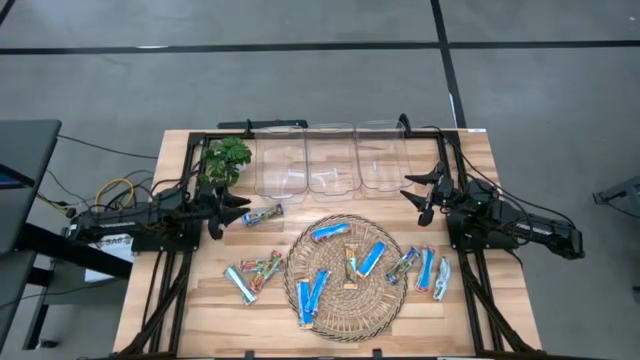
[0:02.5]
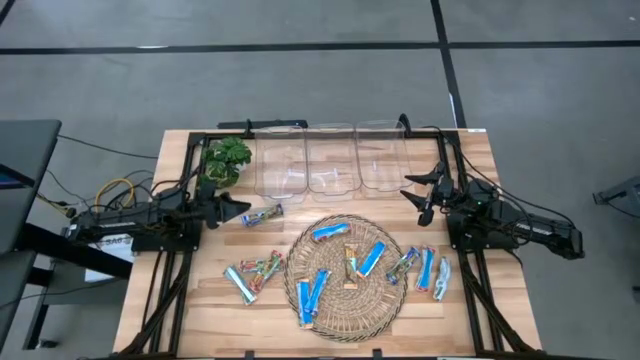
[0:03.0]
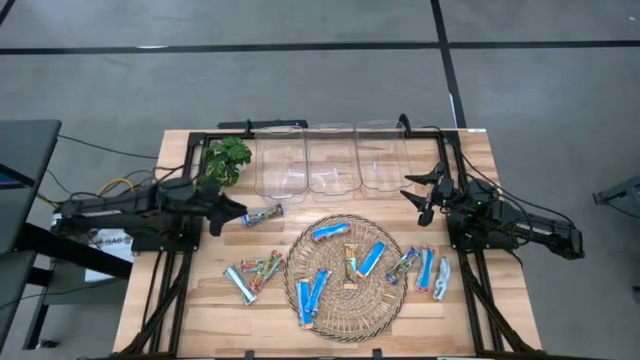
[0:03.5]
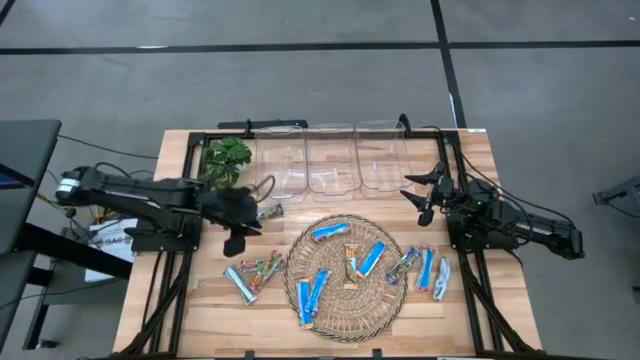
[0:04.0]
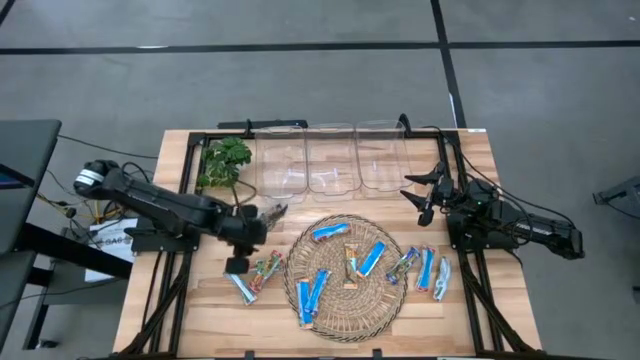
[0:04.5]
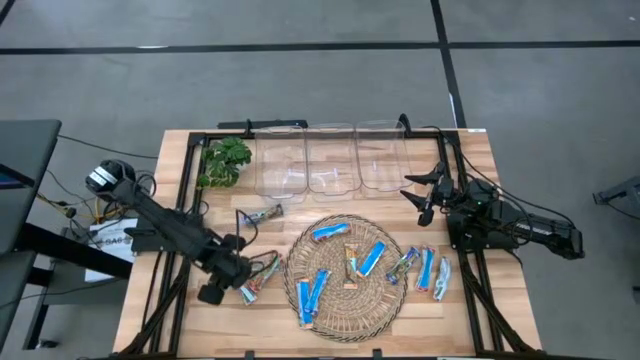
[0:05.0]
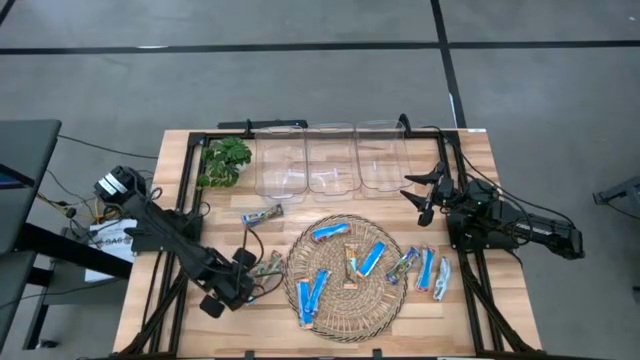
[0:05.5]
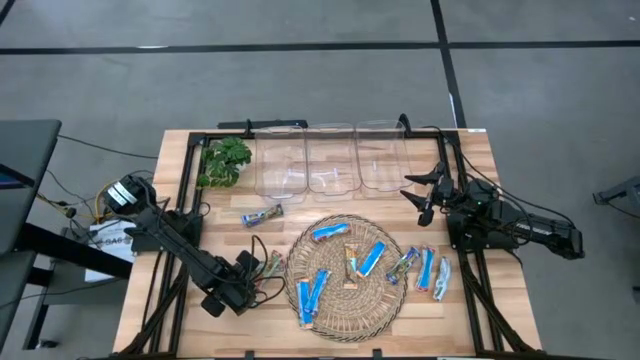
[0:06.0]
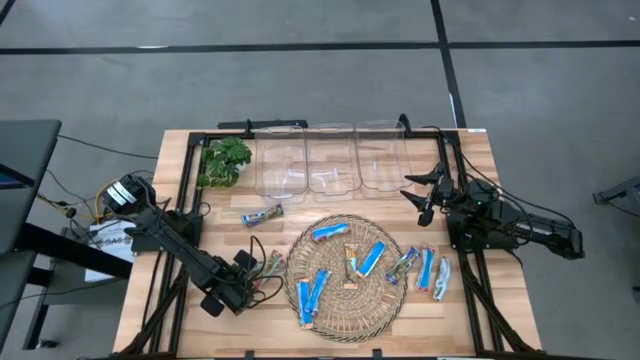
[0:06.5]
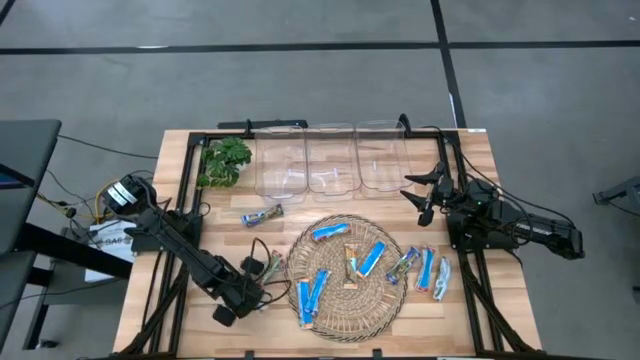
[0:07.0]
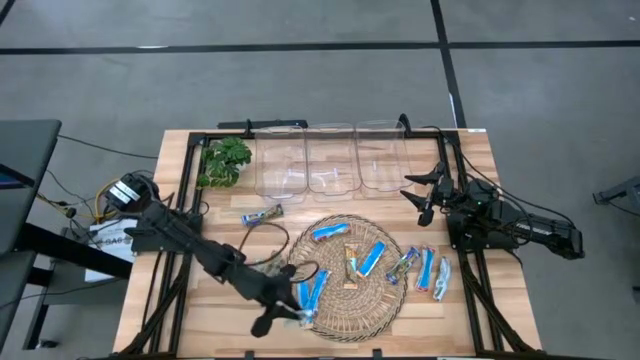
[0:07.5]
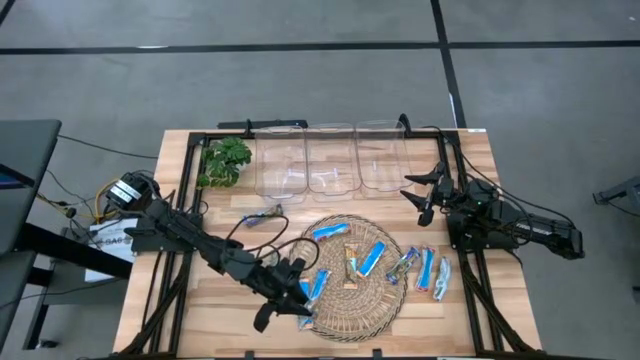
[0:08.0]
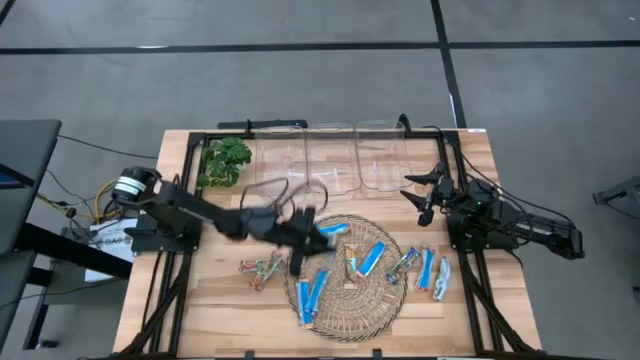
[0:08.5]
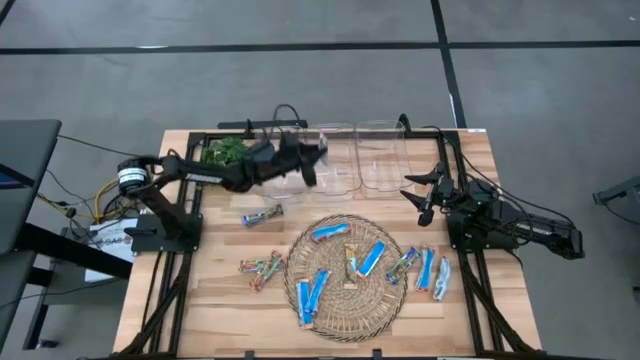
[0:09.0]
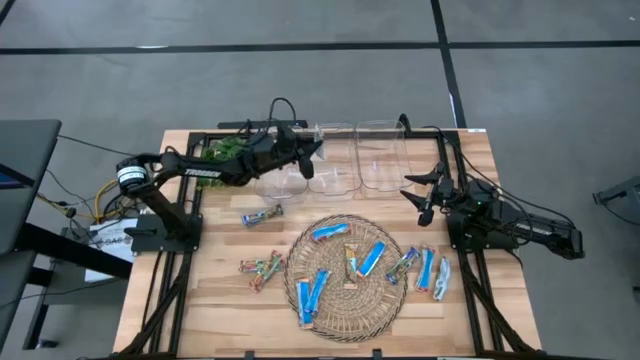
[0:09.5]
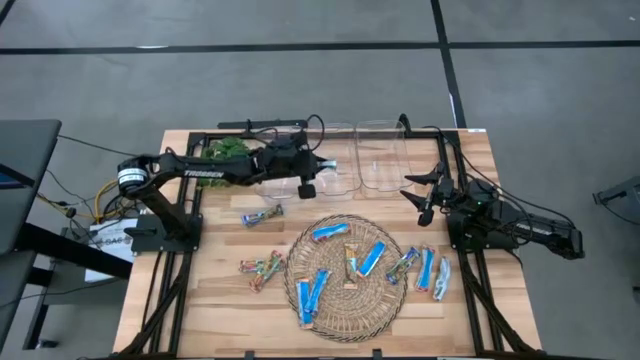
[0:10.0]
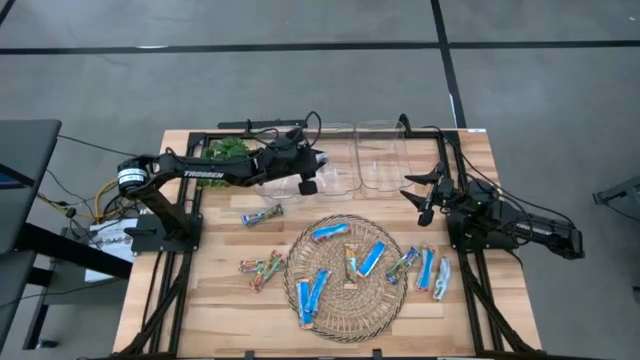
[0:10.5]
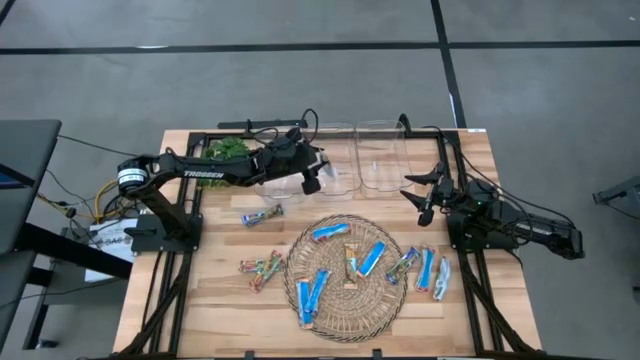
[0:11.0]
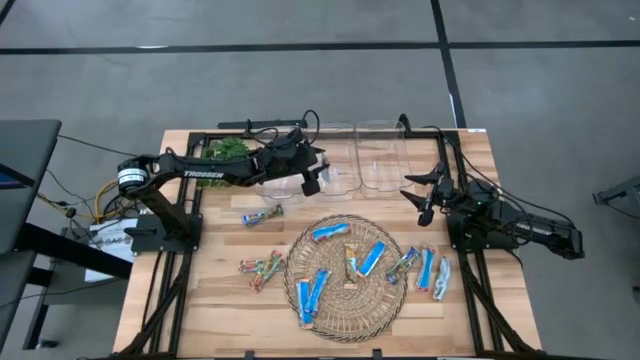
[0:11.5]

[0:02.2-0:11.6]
Task: Pick and place Granola Bars by type
Put the yellow granola bar into the middle transparent bin

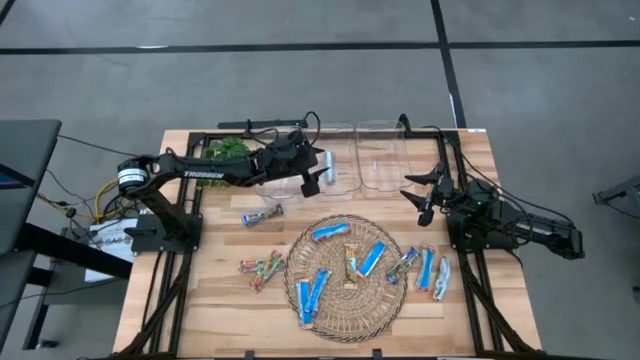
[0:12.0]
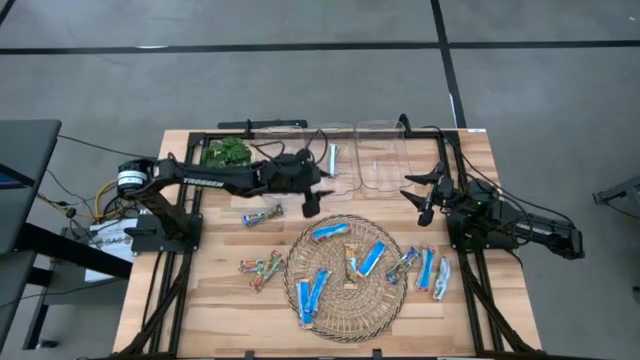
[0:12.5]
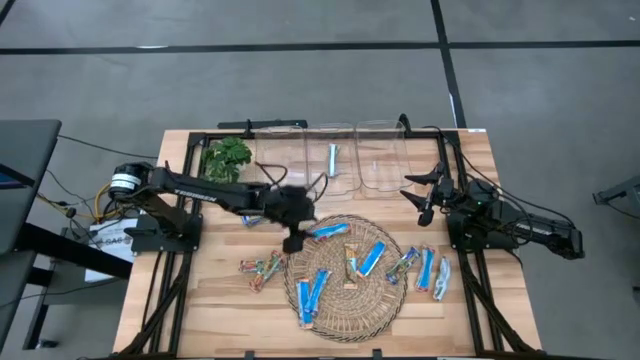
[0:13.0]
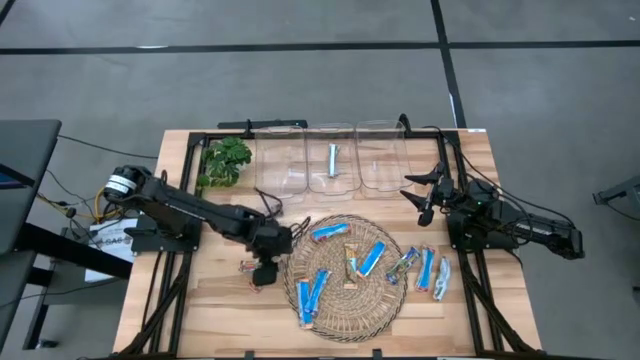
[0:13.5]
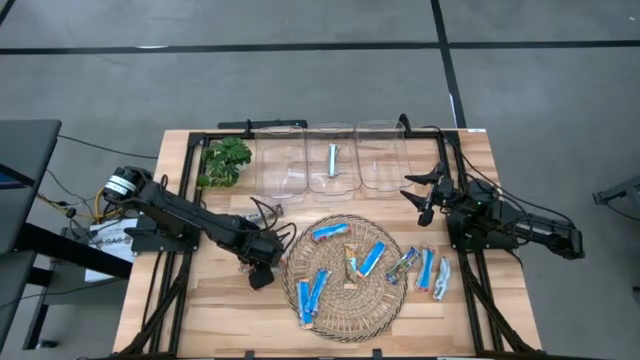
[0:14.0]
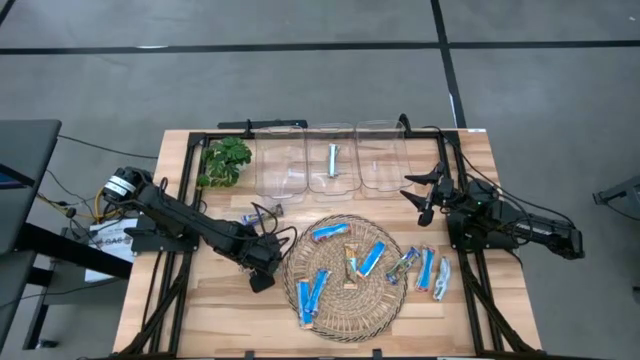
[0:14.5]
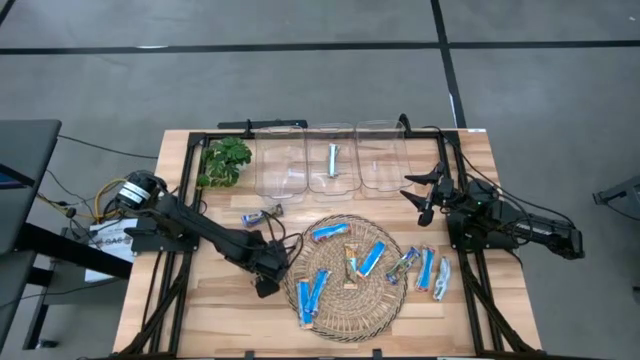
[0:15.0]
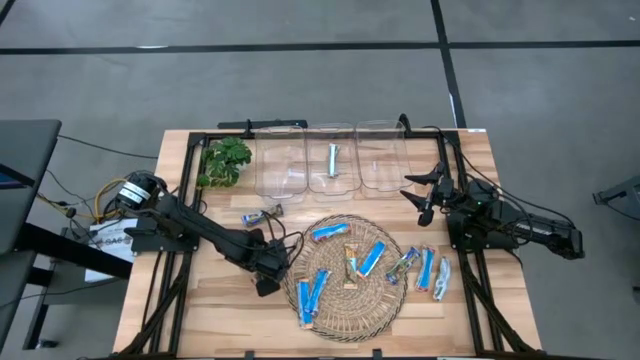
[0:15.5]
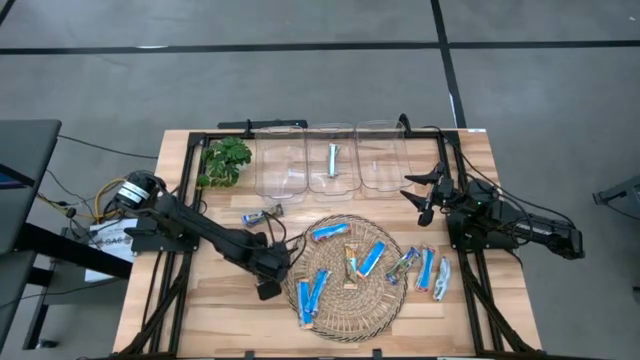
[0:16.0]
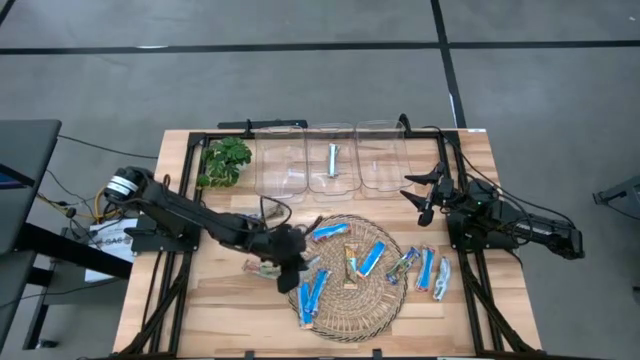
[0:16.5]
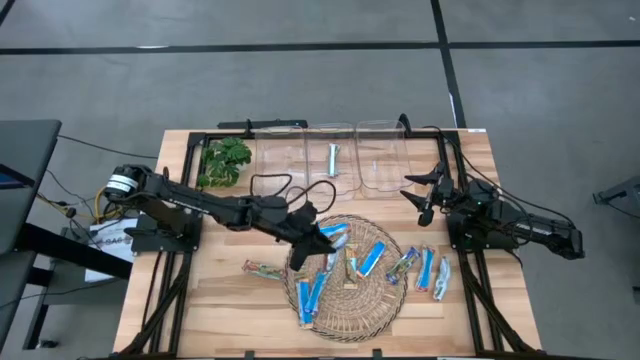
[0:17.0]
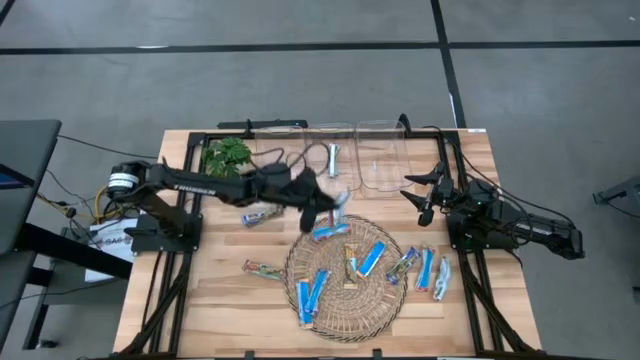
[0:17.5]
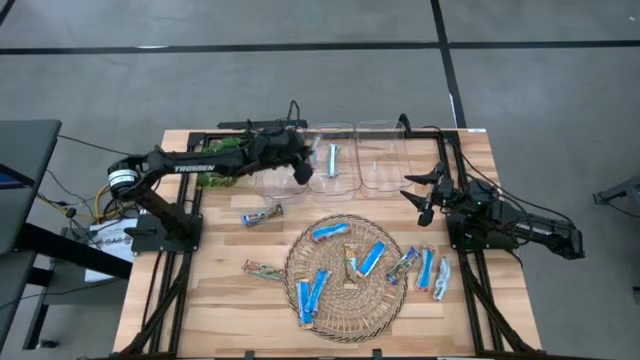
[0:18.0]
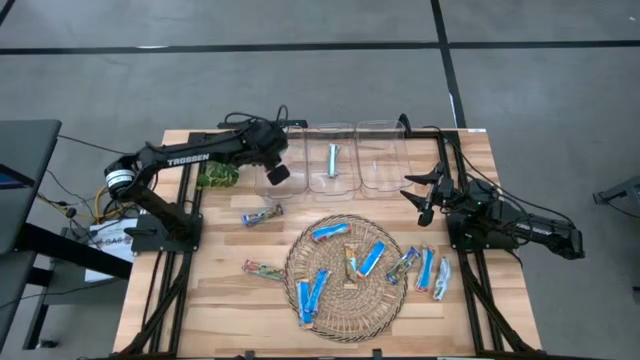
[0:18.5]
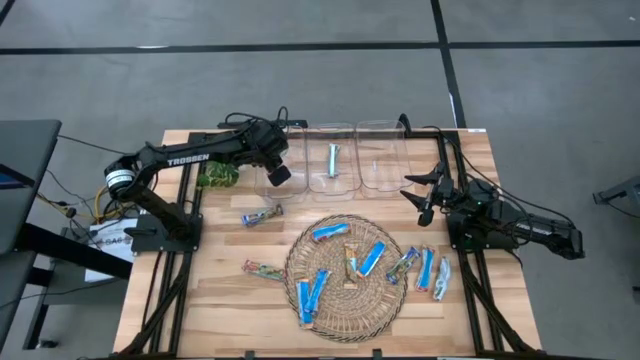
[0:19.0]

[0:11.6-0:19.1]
Put the red granola bar into the left transparent bin

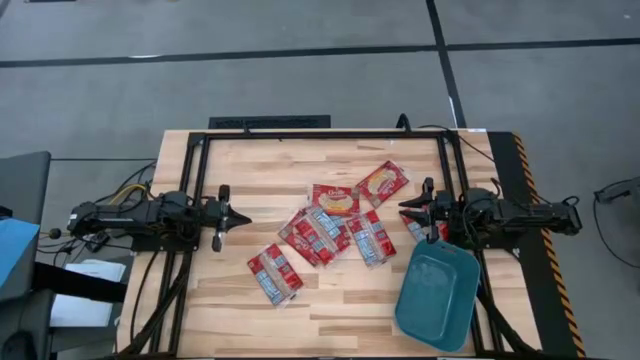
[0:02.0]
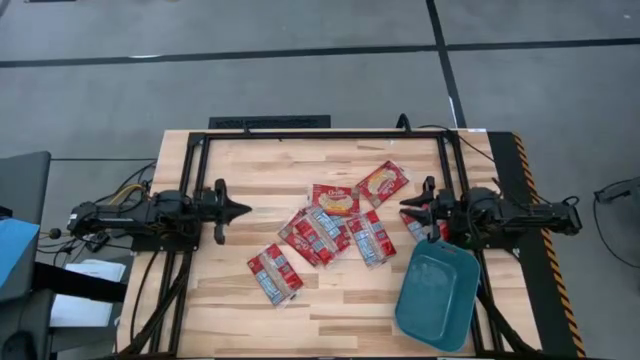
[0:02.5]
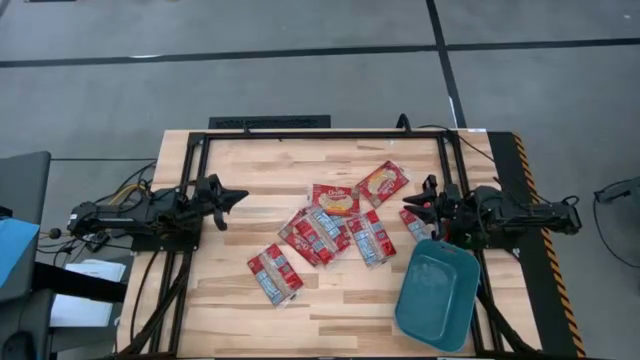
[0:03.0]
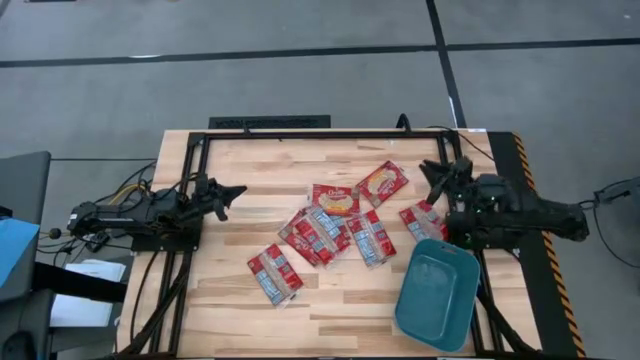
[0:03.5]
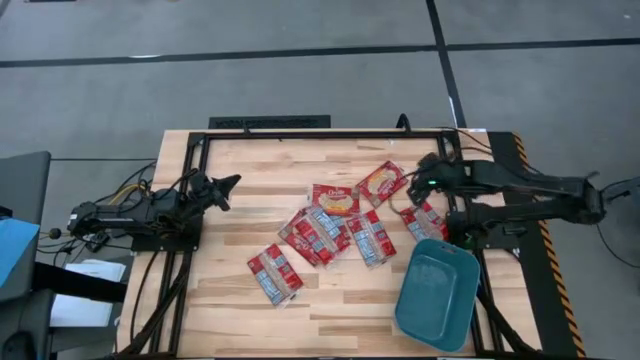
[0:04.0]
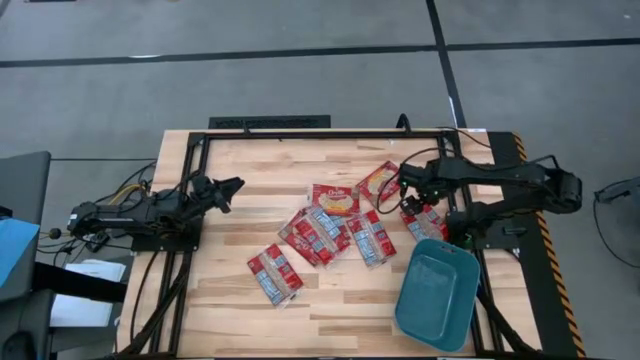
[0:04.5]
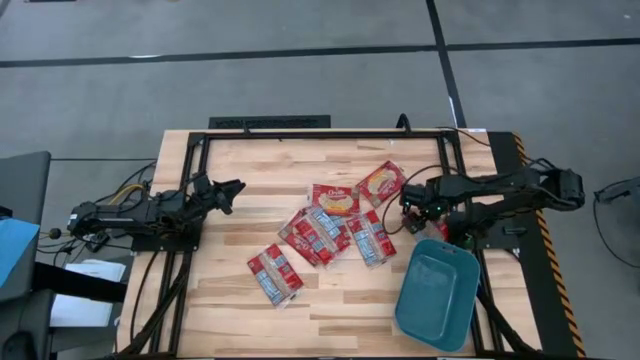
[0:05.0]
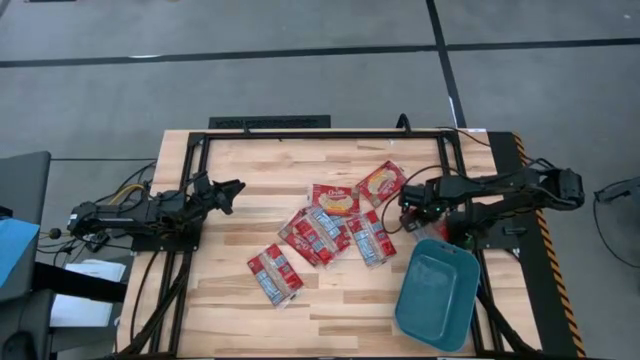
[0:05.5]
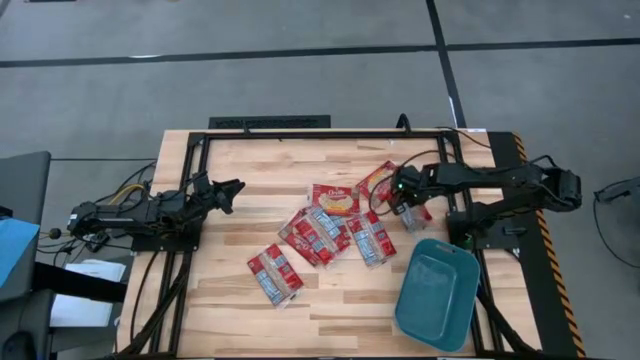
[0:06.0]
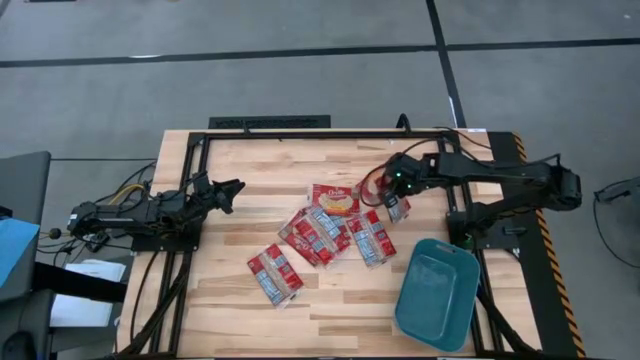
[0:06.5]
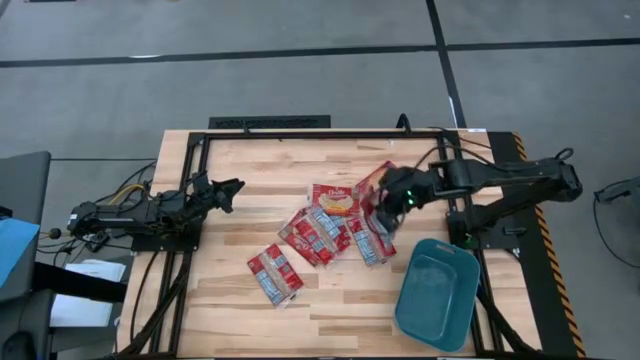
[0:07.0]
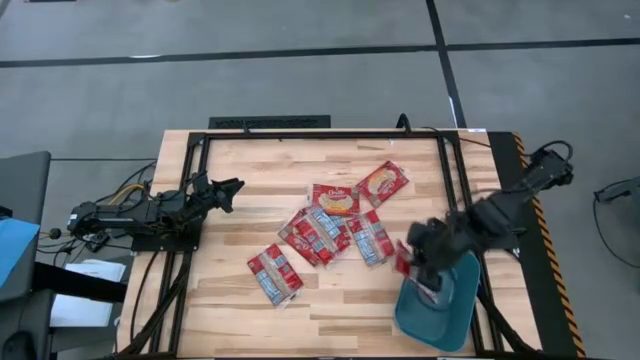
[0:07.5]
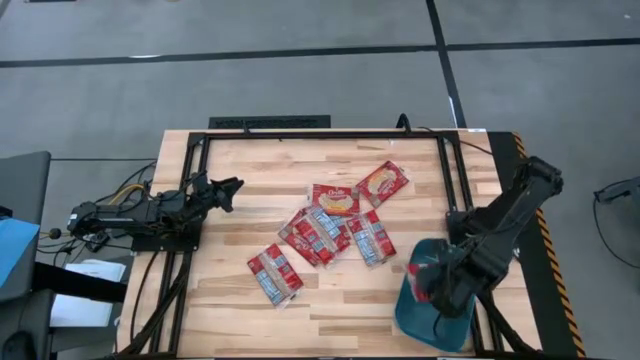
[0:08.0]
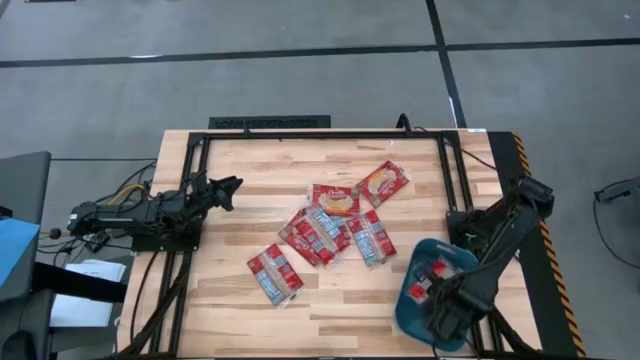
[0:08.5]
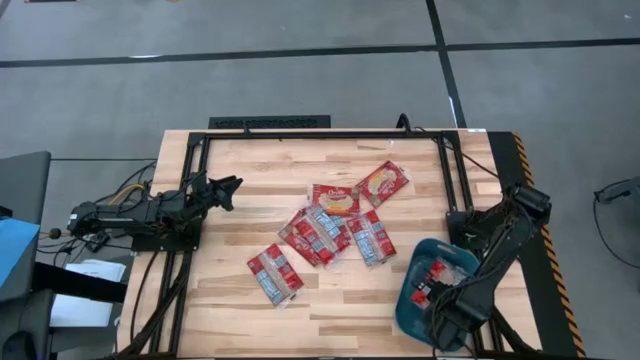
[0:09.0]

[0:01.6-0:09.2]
Task: Sort popcorn bags into baskets
Put the popcorn bag into the blue bin
